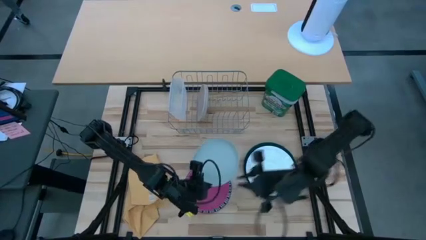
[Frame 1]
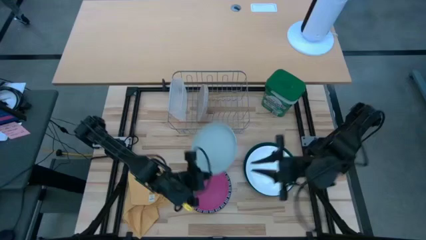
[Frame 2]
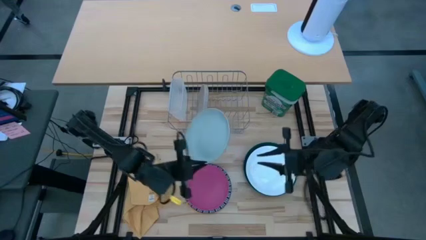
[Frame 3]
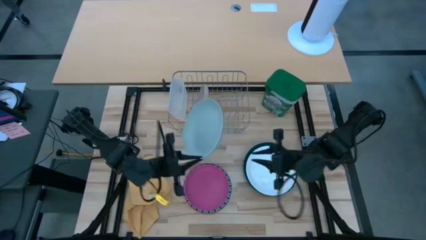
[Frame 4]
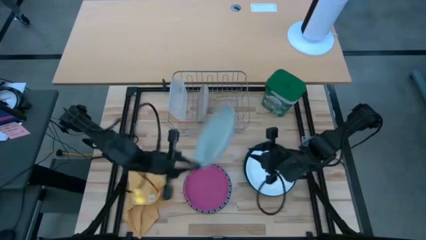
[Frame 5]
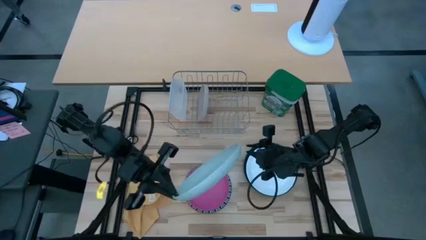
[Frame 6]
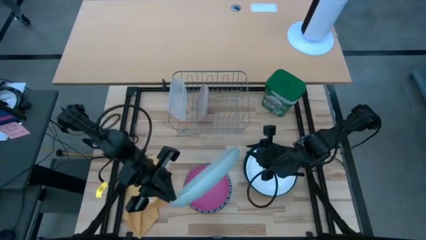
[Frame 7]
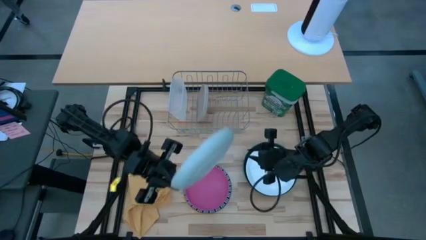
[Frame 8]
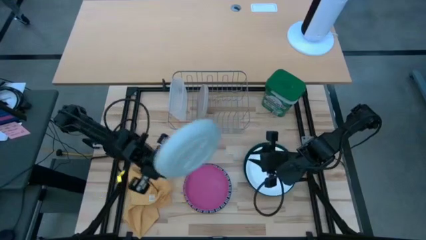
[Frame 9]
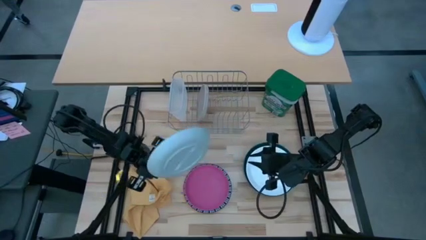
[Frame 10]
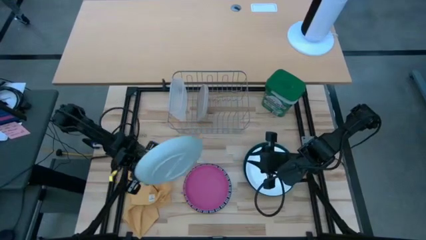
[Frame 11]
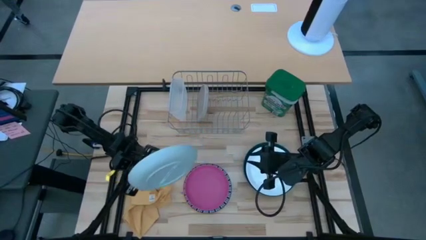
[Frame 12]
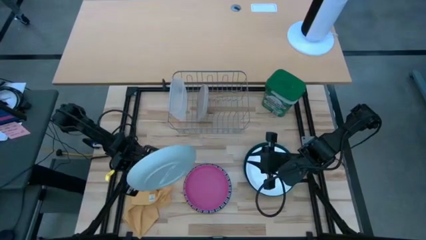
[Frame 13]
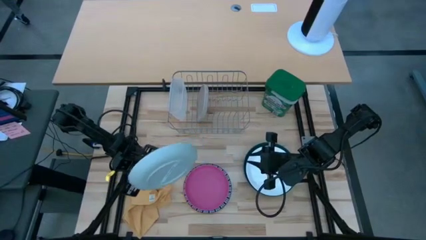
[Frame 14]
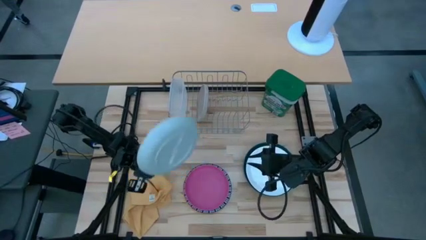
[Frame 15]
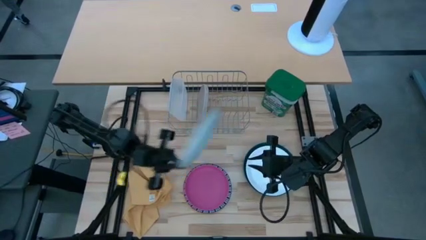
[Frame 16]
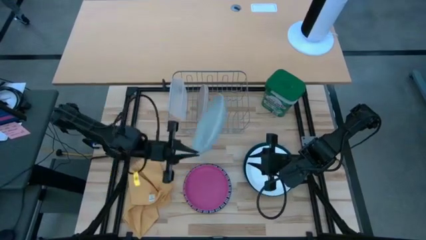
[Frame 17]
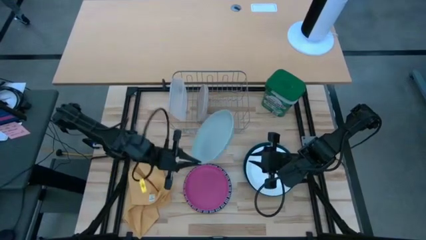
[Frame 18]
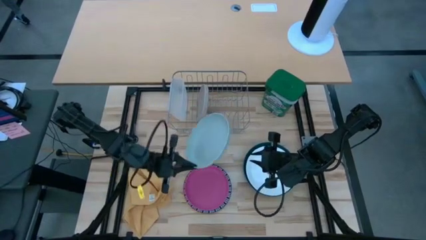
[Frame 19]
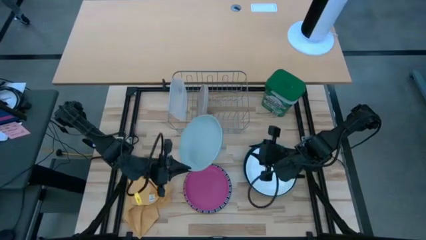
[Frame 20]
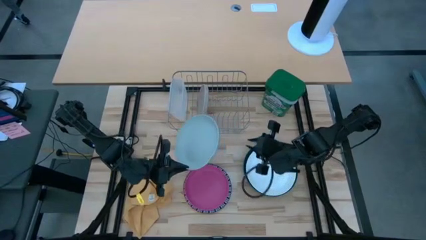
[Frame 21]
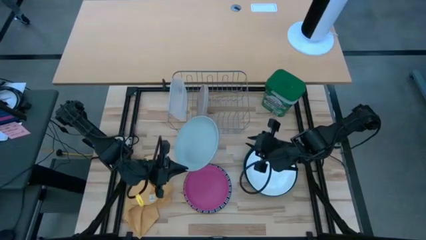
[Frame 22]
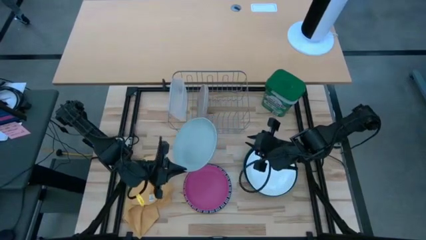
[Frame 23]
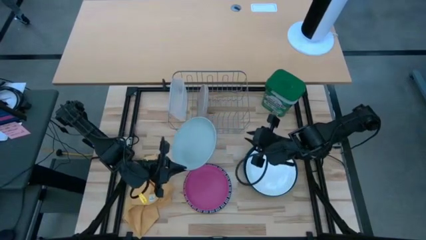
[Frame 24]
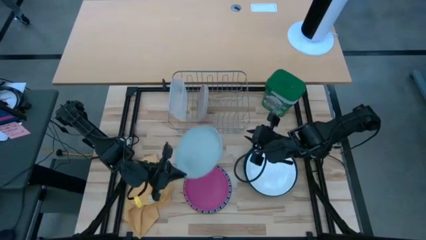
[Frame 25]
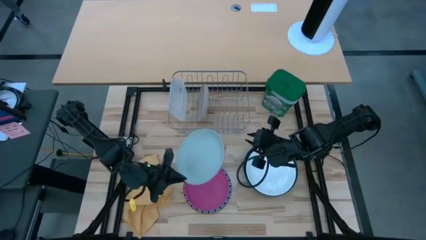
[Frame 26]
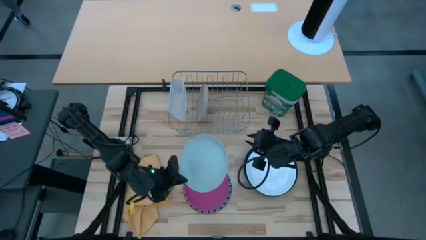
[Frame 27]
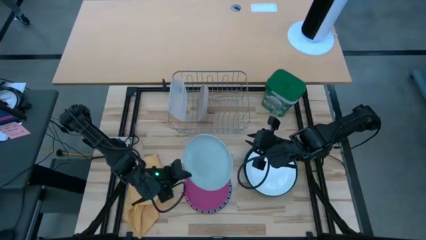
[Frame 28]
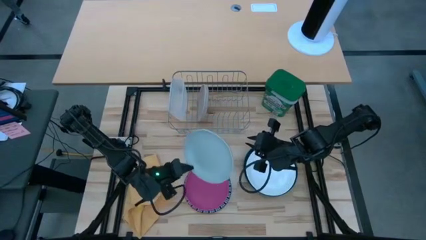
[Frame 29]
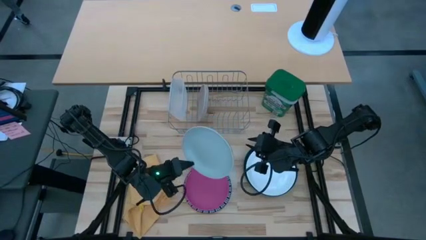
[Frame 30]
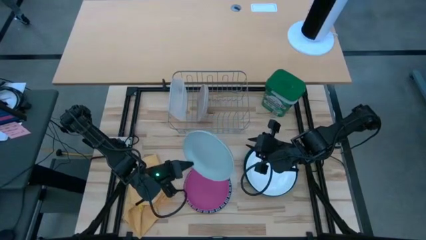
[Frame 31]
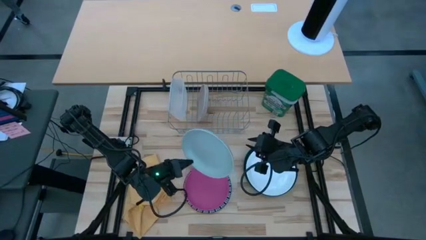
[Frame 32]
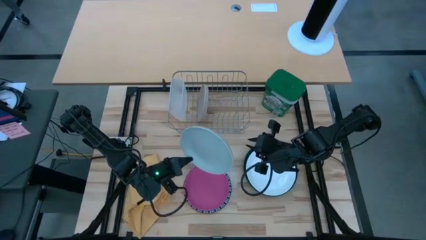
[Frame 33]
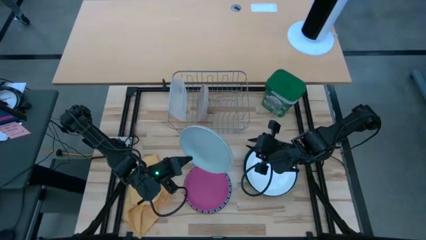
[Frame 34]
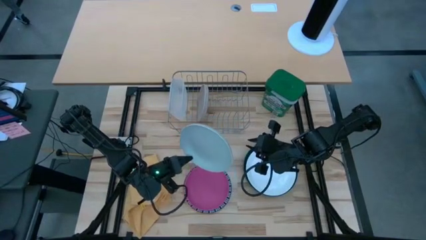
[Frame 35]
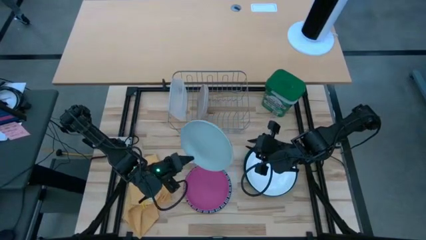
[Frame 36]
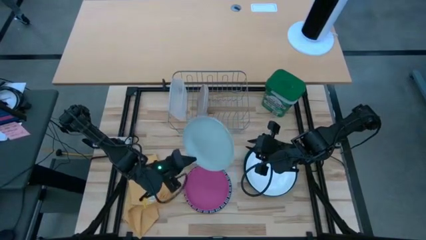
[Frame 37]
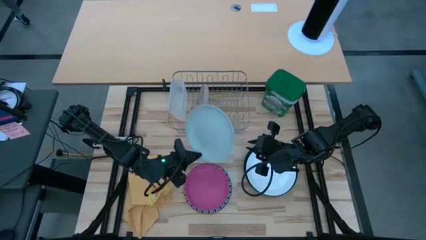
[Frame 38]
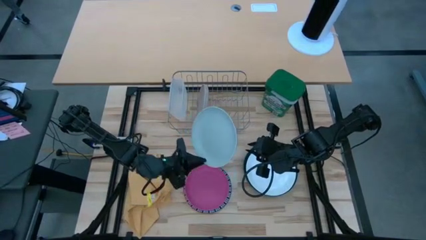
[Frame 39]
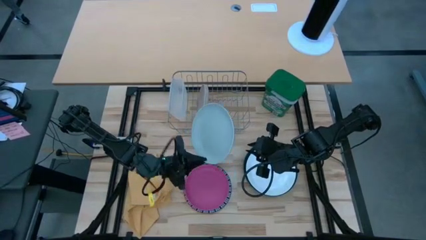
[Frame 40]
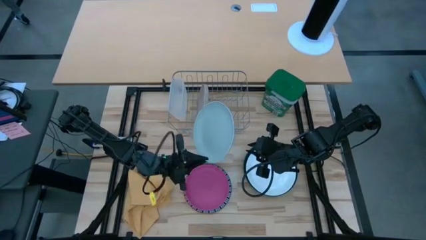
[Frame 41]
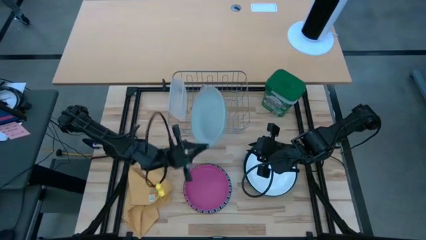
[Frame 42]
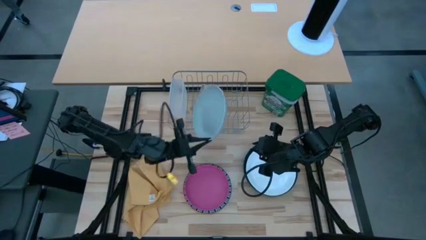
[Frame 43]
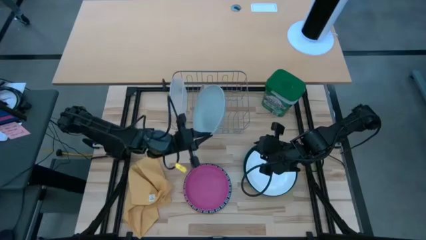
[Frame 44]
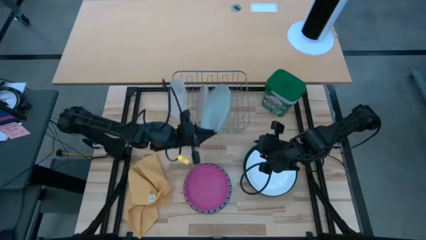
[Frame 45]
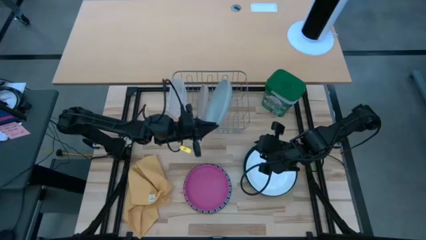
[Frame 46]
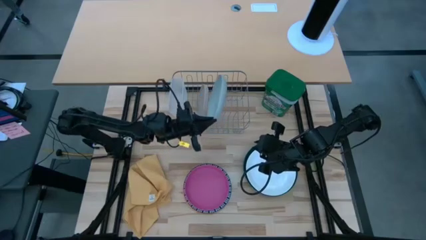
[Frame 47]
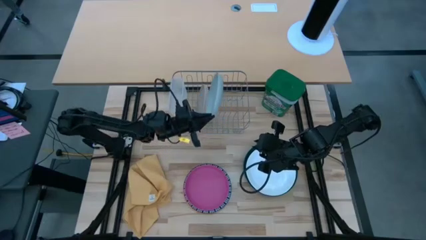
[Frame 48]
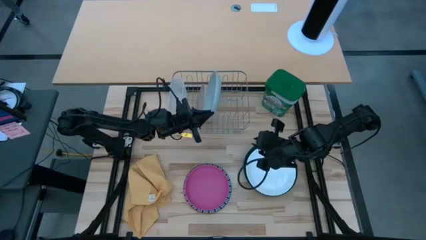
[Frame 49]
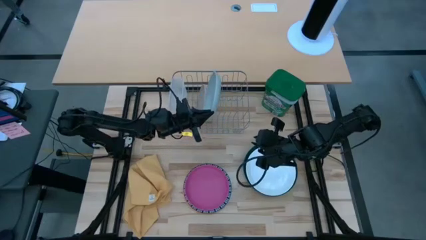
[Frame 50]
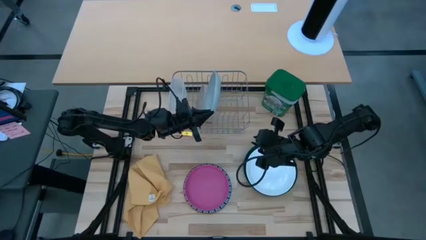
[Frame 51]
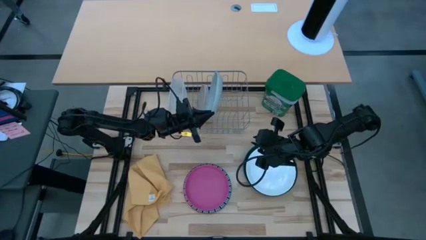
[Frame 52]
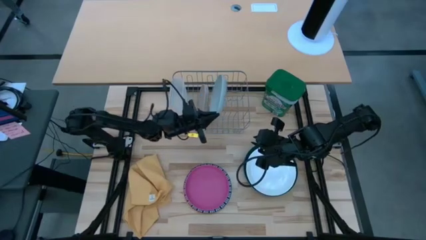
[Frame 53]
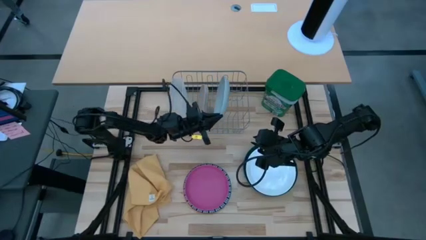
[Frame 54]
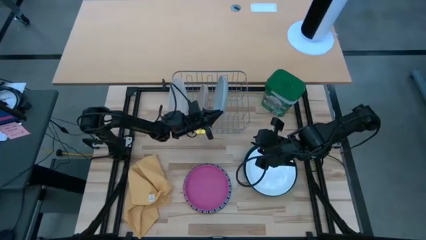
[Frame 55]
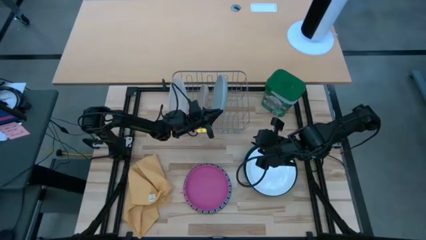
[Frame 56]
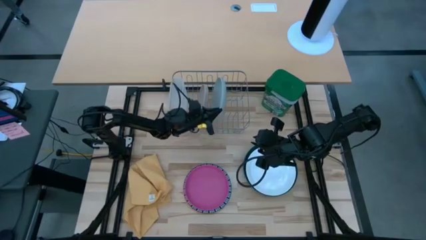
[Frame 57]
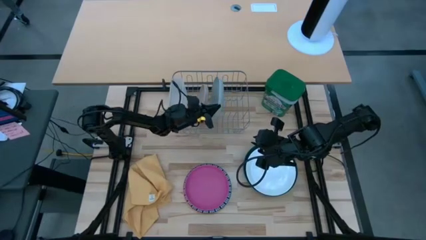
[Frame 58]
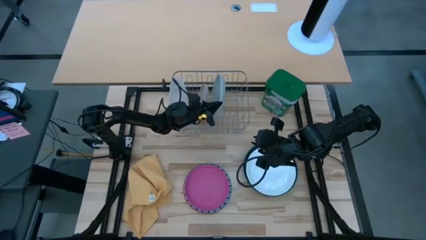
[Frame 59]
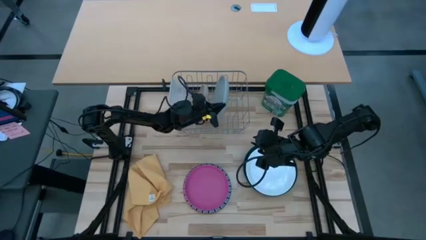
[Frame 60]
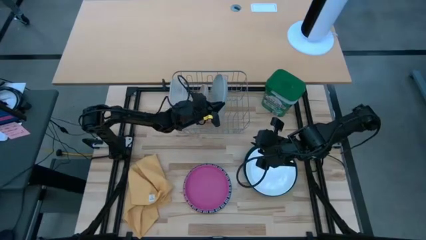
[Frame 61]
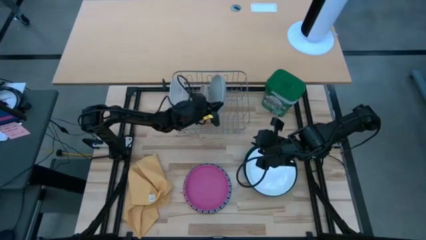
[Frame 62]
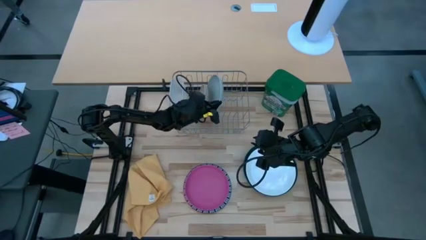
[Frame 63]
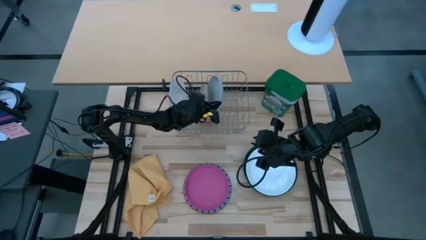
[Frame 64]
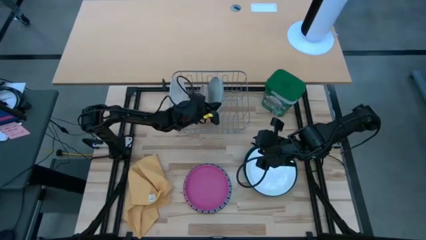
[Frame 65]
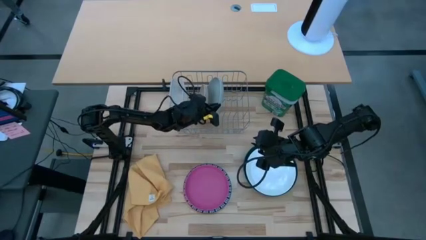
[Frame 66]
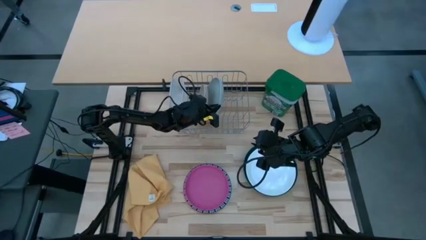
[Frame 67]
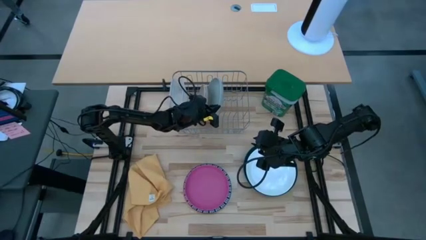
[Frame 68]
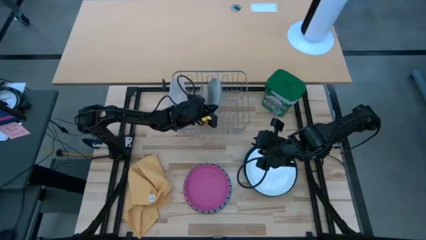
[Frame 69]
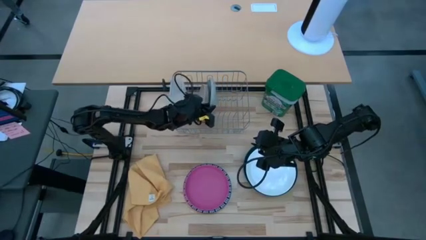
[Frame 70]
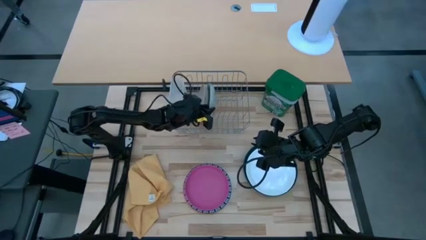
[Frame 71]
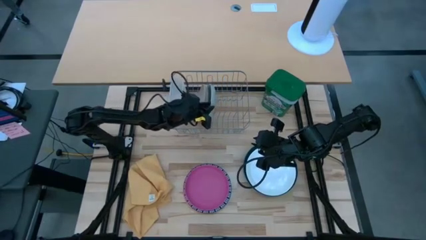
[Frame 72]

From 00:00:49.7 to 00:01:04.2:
Task: Sort dishes
Put the light blue plate into the dish rack

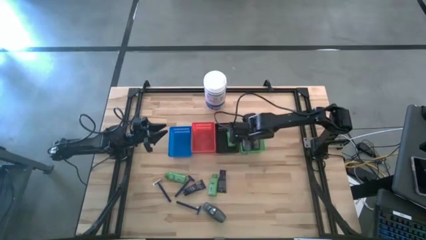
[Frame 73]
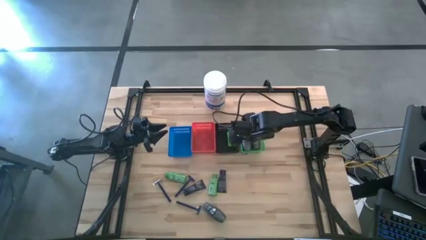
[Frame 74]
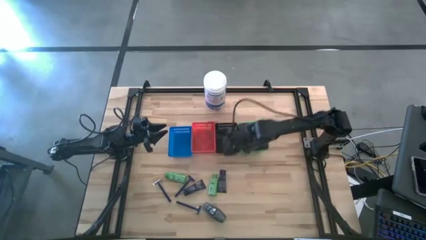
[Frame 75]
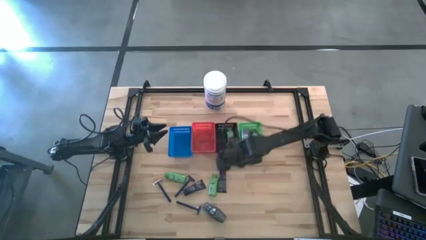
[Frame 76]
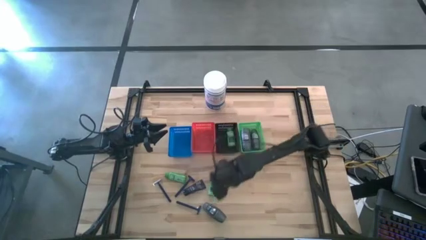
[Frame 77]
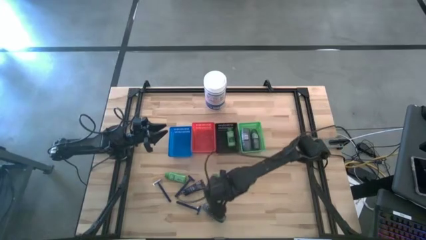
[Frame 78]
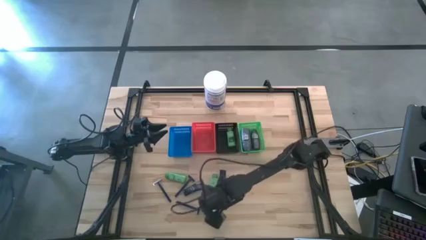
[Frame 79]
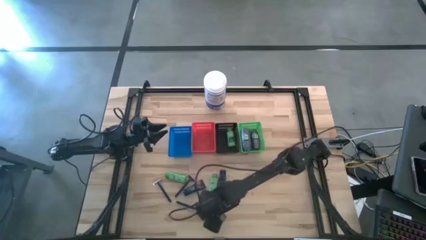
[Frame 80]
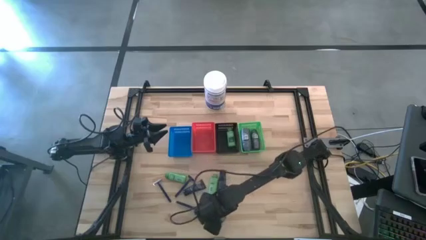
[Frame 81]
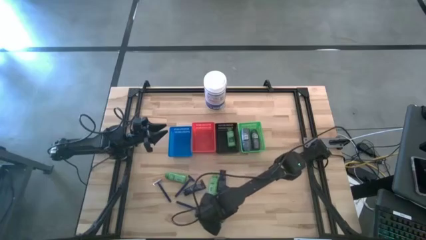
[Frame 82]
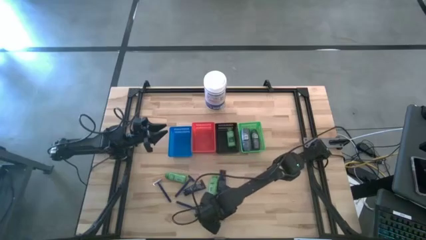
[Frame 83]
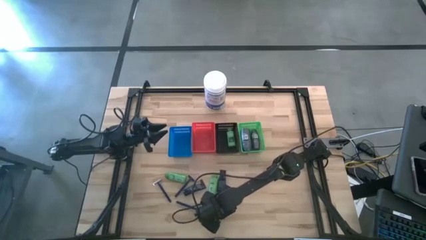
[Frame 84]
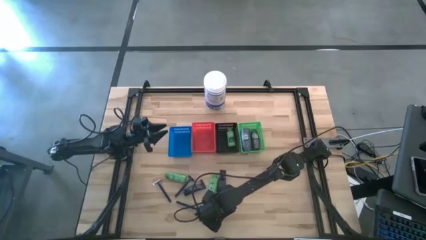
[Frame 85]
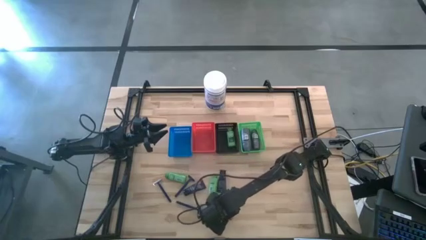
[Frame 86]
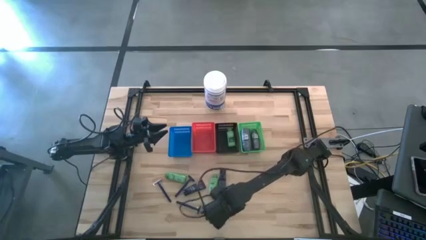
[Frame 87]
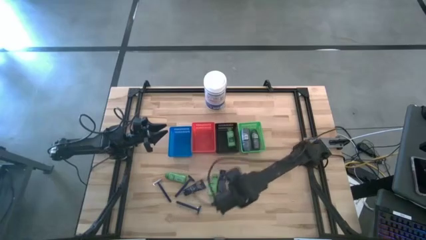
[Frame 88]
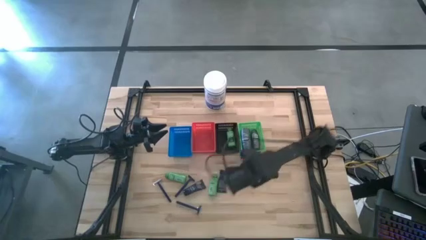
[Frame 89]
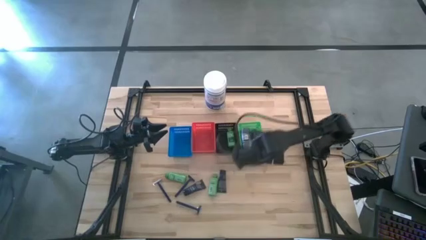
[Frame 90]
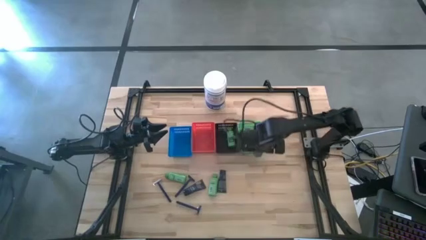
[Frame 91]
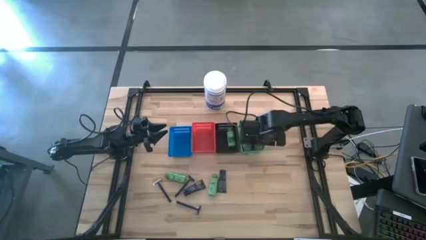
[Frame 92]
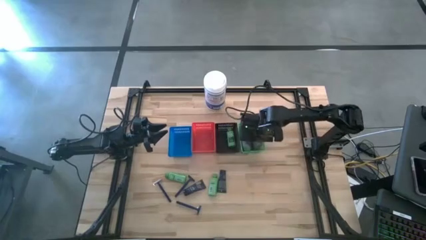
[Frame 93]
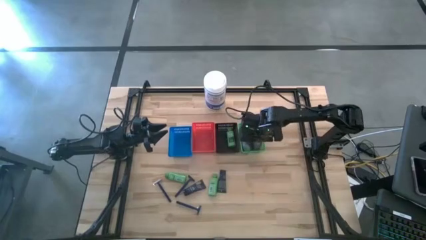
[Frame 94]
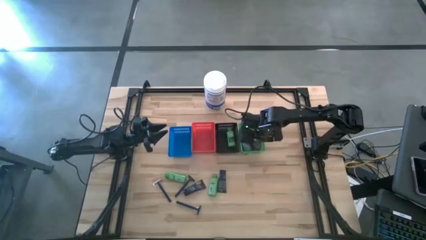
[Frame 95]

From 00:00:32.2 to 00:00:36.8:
Task: Pick & Place Travel size toiletries
Put the black deodorant into the green basket
